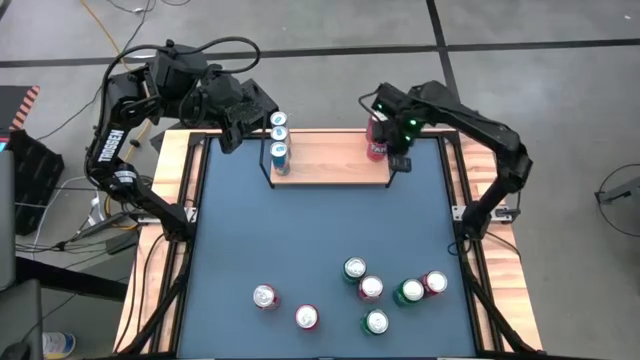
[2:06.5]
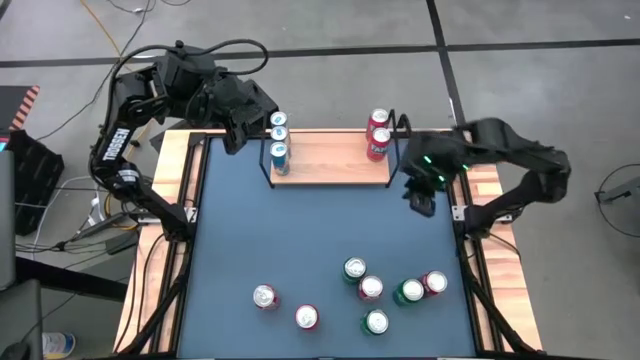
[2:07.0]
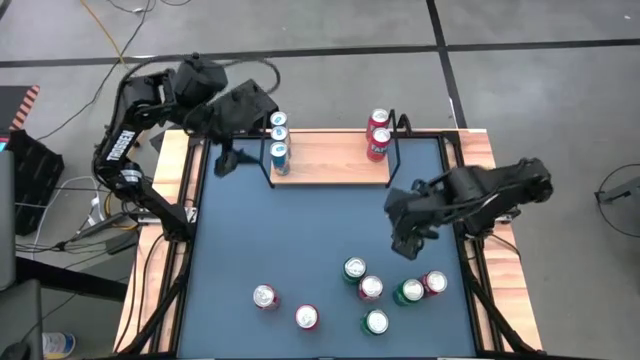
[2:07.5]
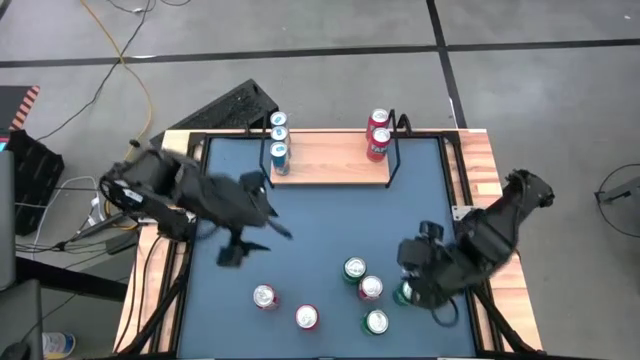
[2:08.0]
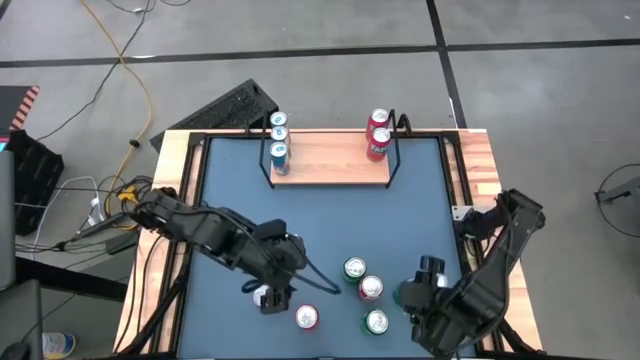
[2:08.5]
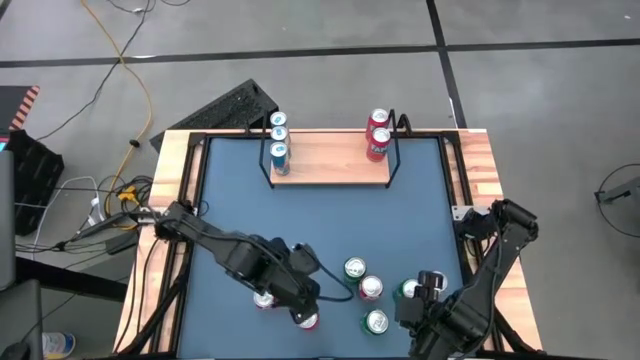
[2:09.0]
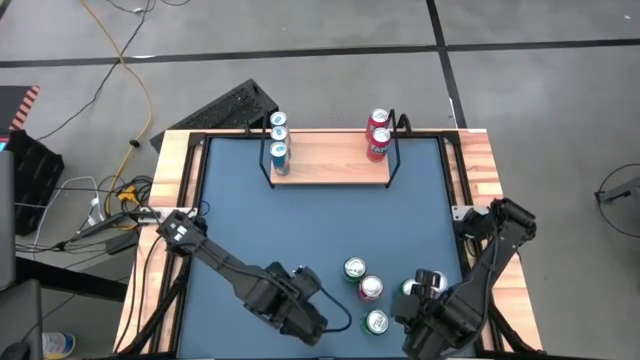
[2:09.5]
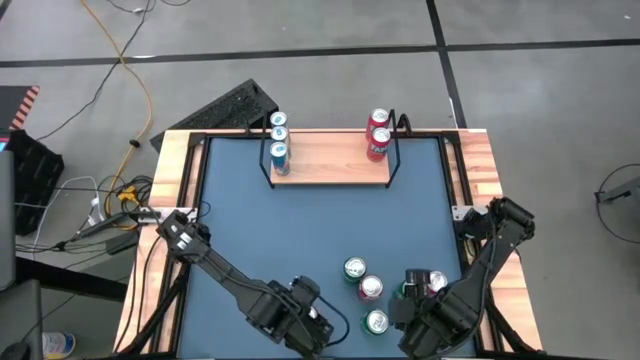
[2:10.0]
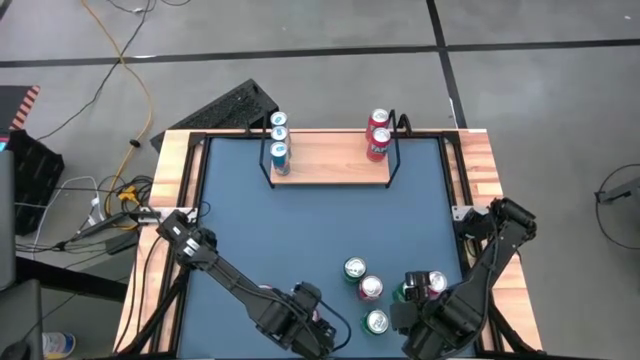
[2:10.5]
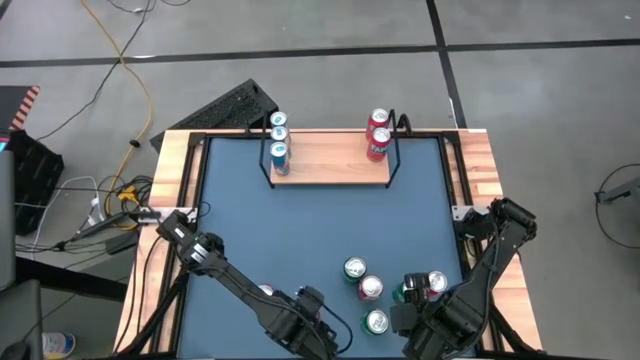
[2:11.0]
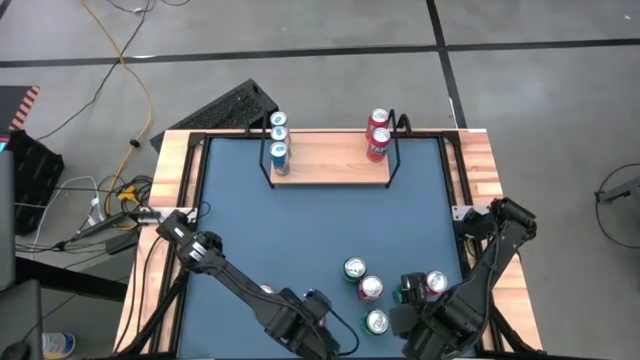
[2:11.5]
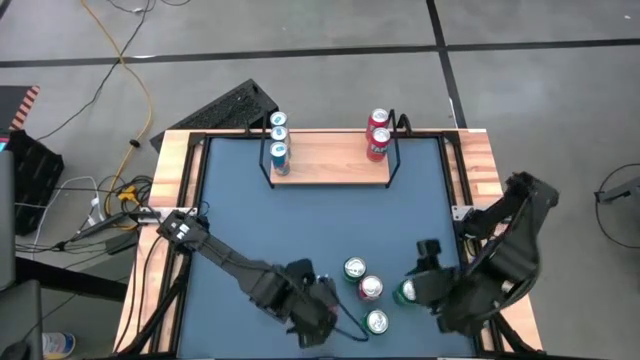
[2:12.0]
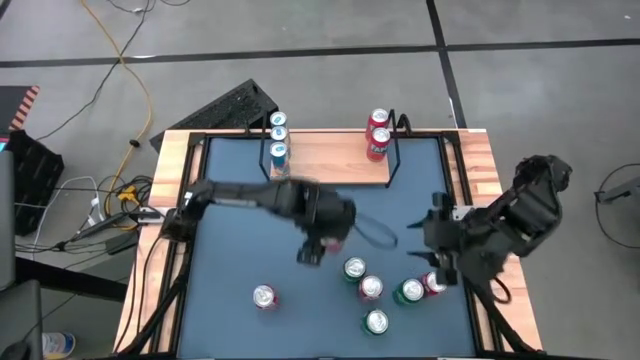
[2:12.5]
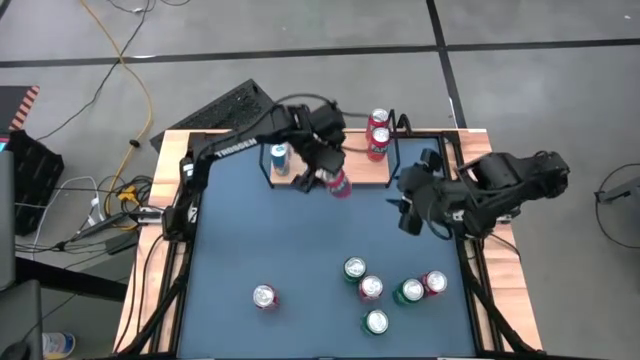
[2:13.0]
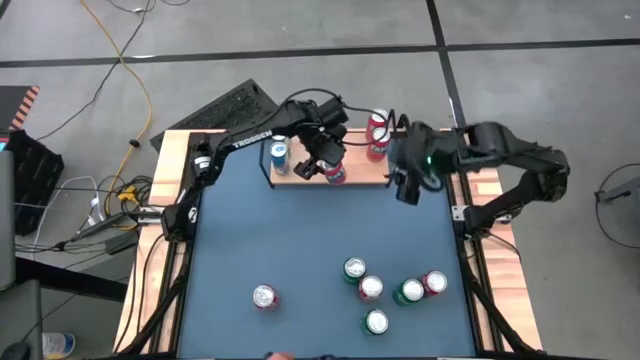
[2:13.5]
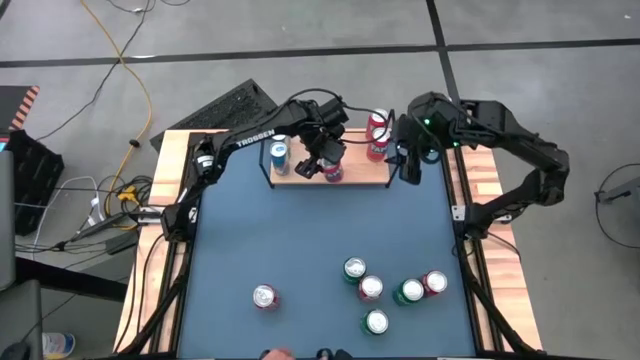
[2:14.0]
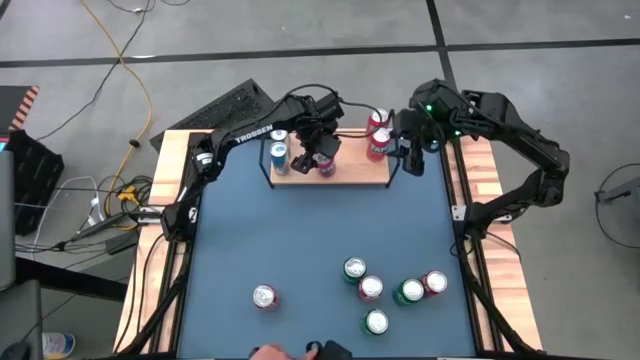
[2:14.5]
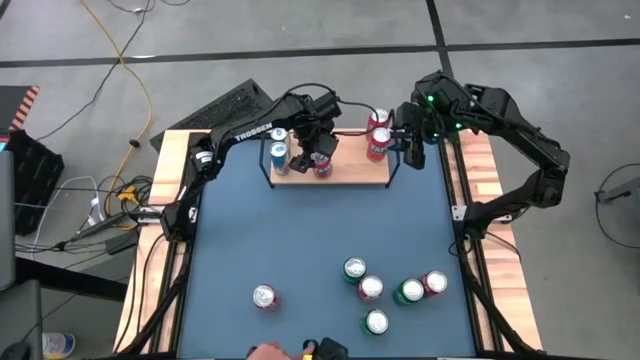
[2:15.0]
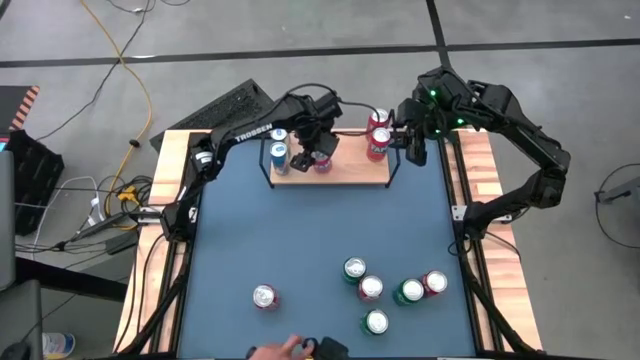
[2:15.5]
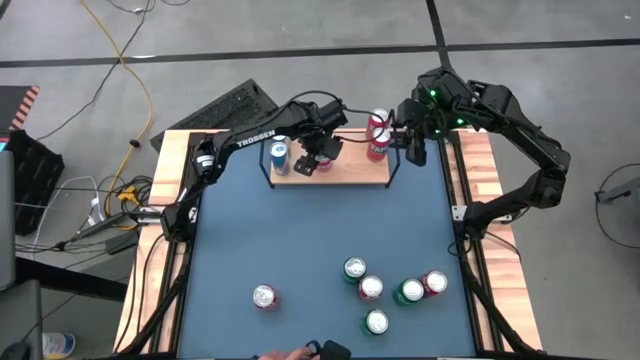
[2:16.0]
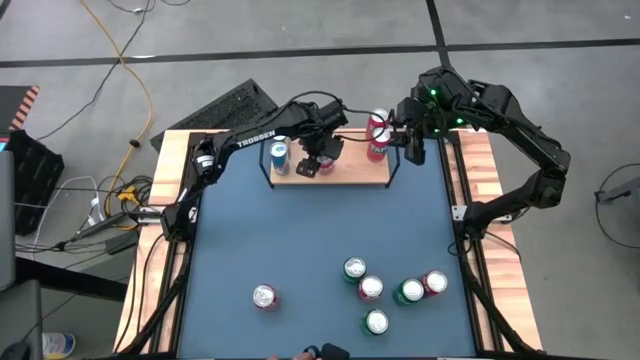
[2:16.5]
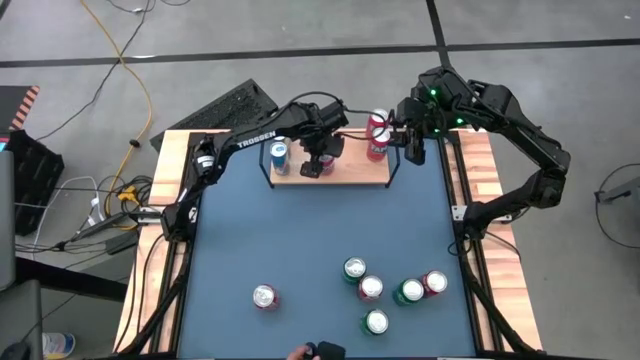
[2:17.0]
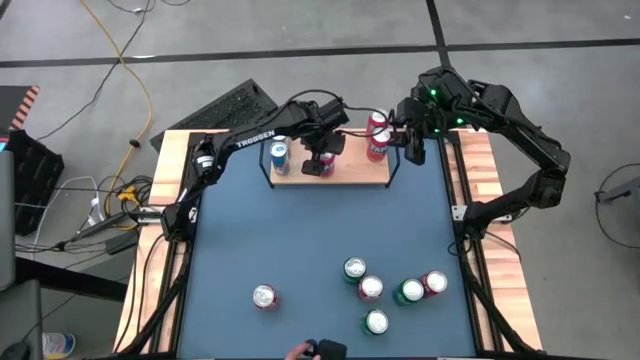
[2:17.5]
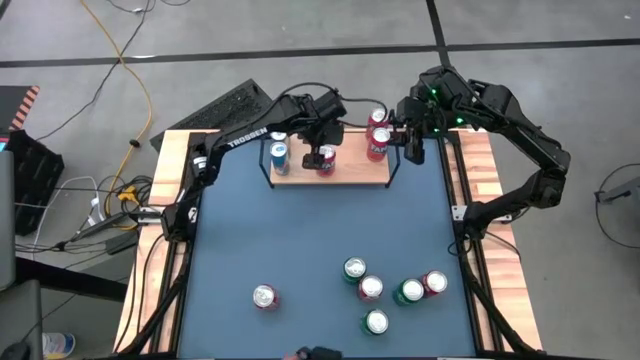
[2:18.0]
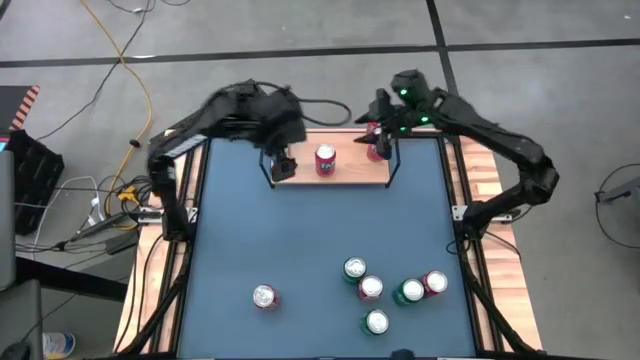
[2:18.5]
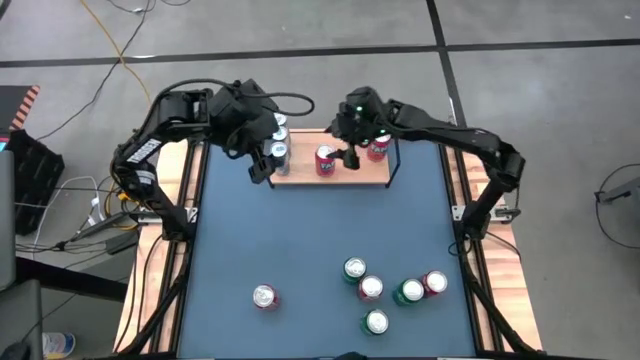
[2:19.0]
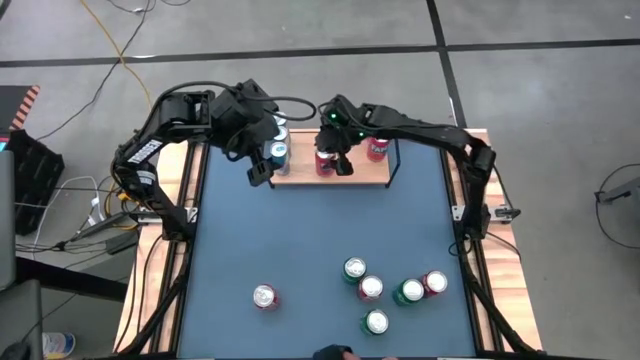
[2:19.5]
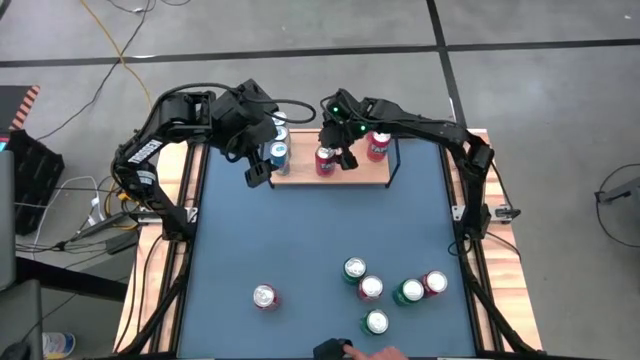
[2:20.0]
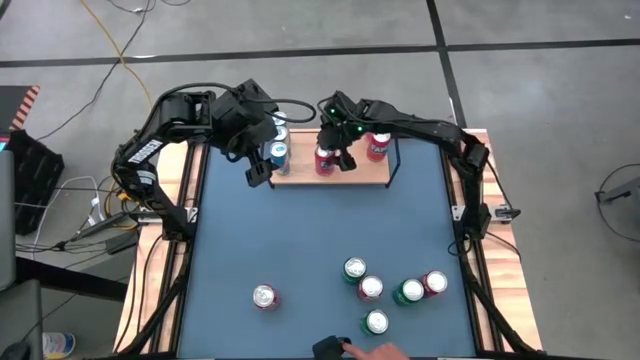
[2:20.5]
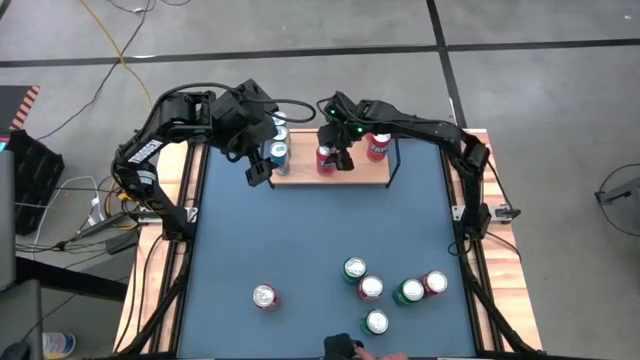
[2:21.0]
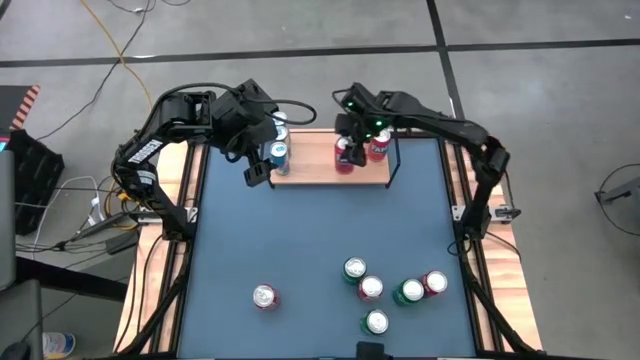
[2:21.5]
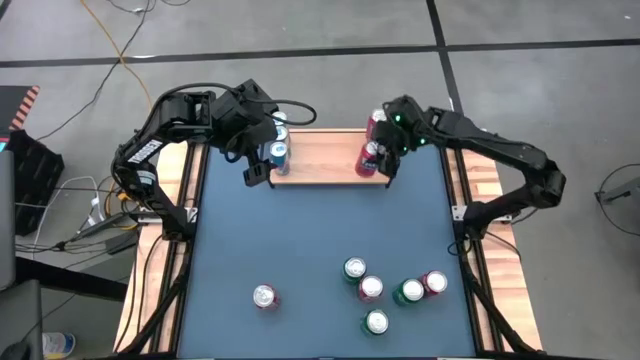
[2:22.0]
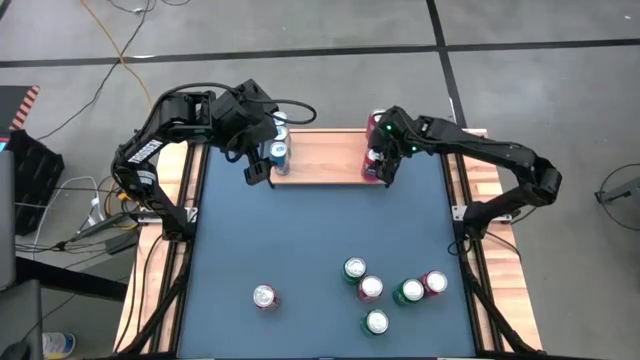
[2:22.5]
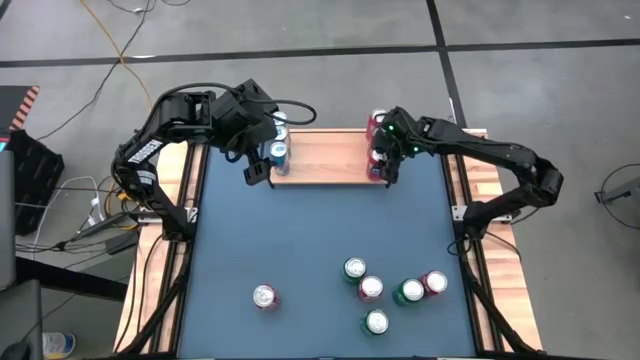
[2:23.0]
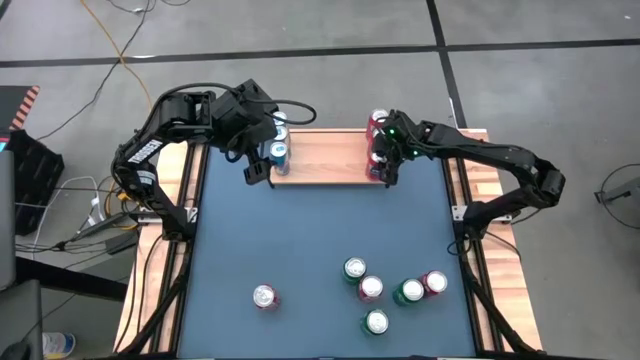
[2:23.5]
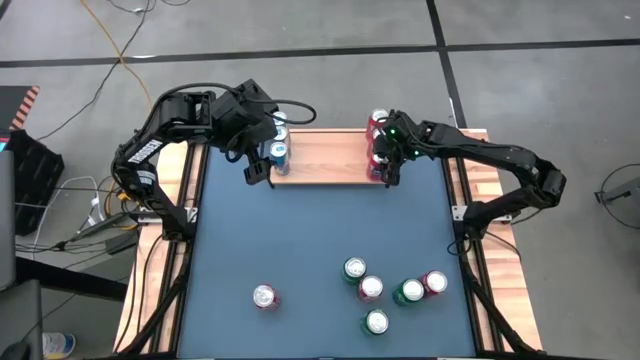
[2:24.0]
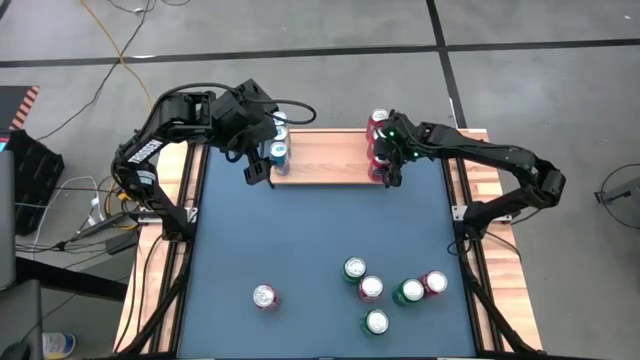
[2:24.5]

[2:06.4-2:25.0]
Task: Place canned beverage on shelf
Put the red soda can on the shelf aligned with the other red soda cans
